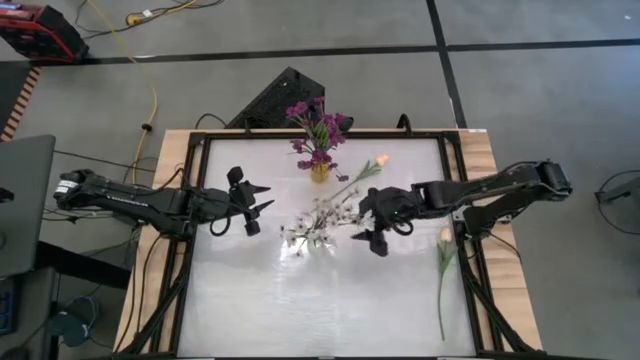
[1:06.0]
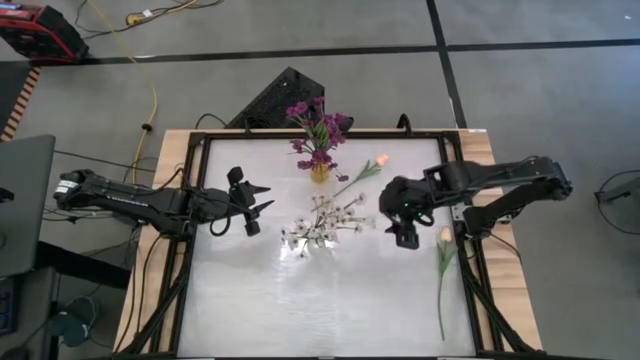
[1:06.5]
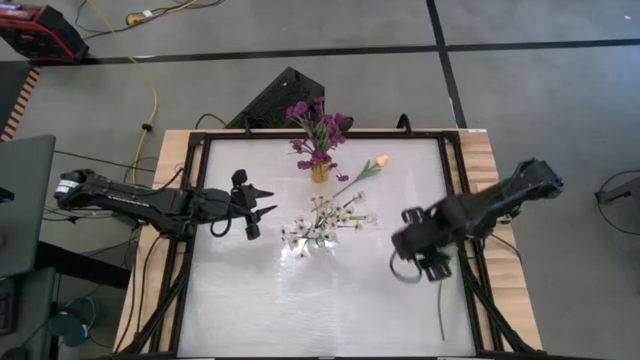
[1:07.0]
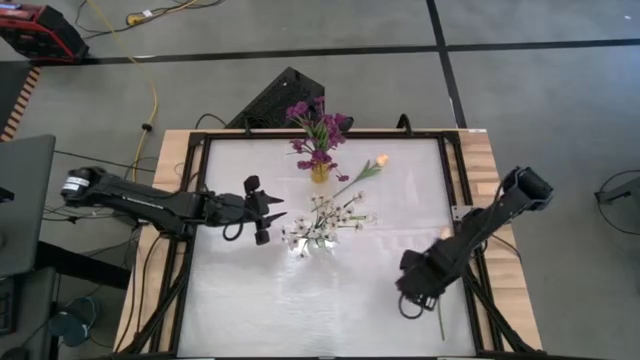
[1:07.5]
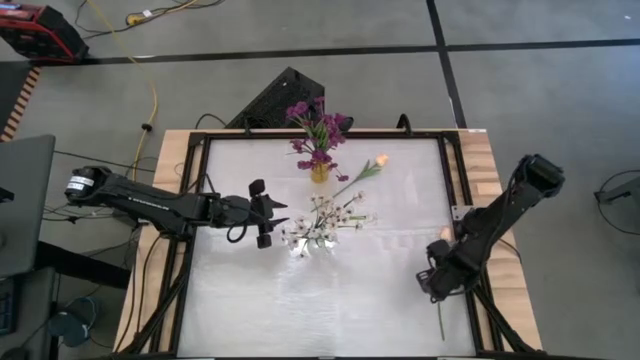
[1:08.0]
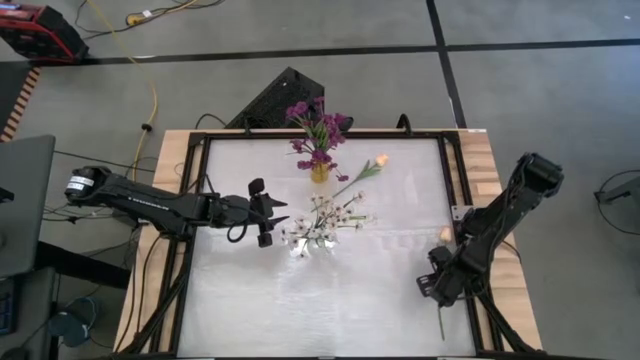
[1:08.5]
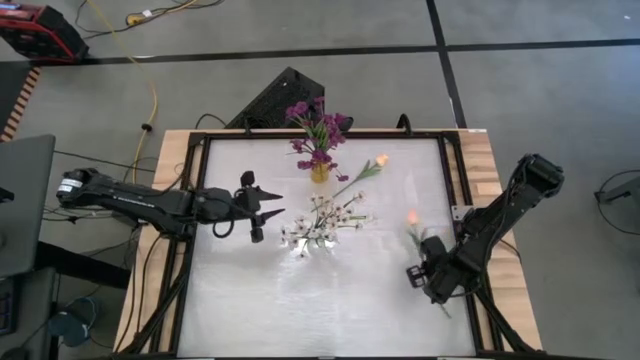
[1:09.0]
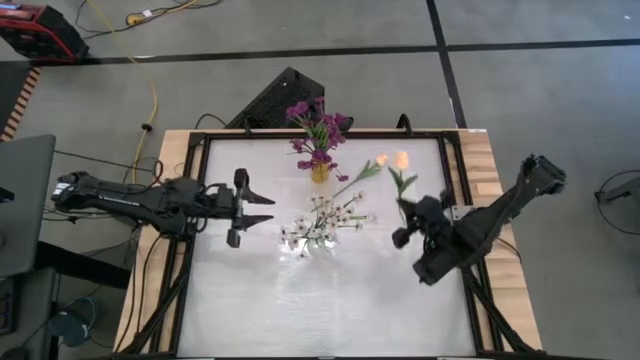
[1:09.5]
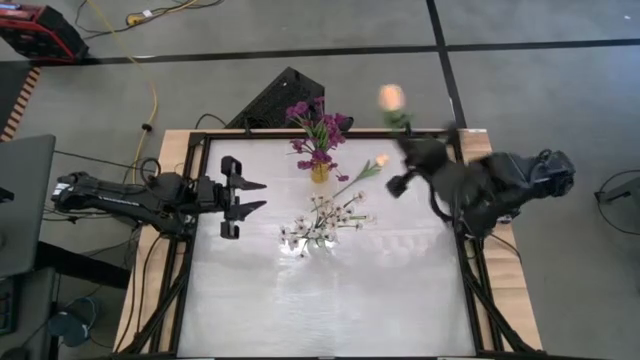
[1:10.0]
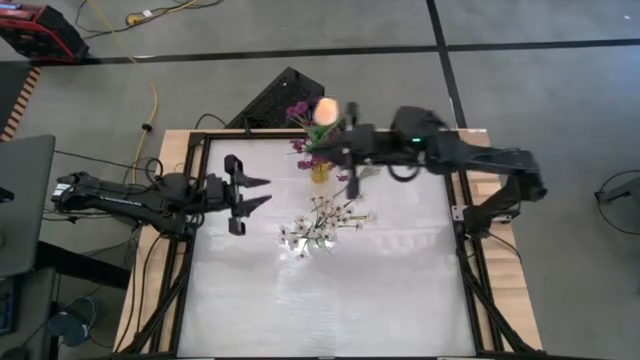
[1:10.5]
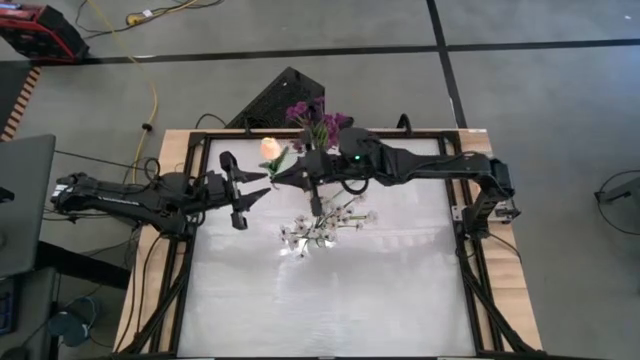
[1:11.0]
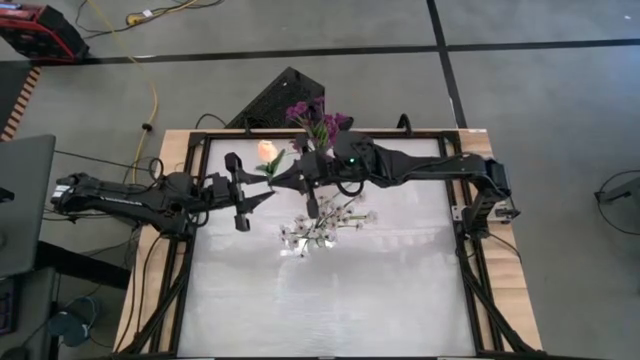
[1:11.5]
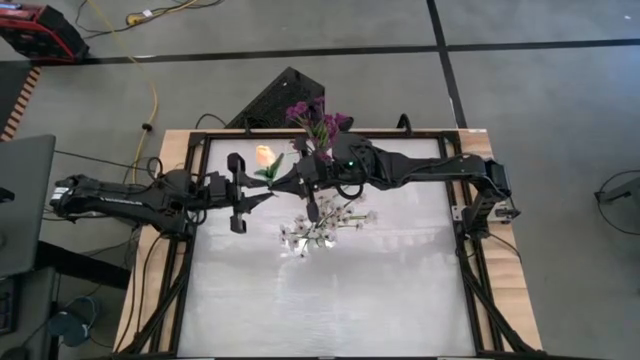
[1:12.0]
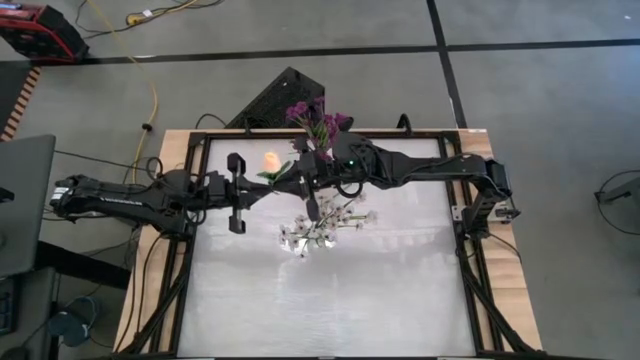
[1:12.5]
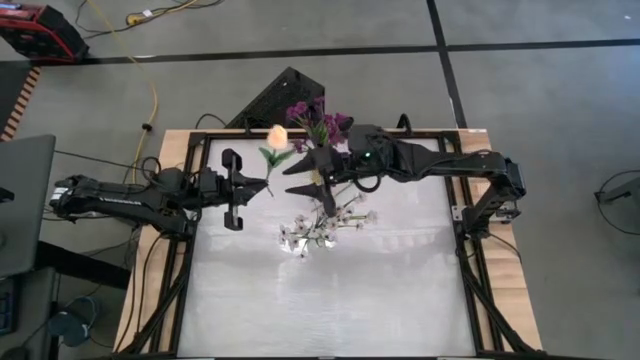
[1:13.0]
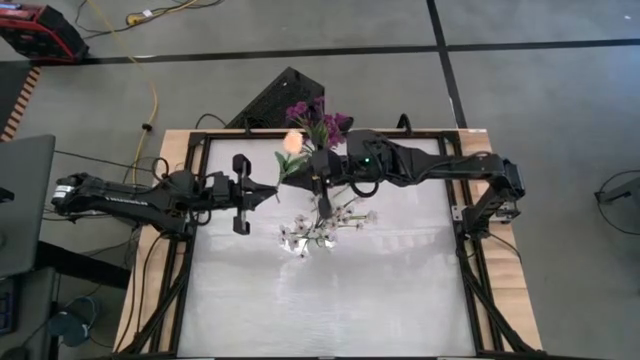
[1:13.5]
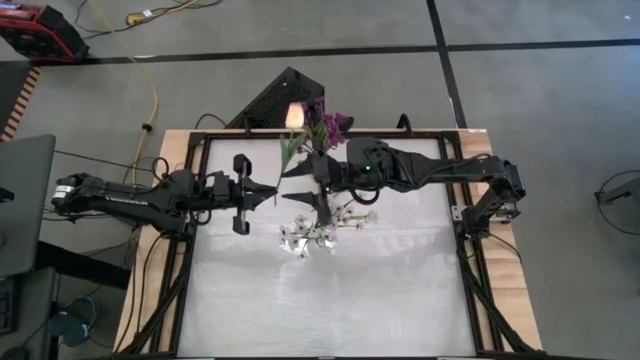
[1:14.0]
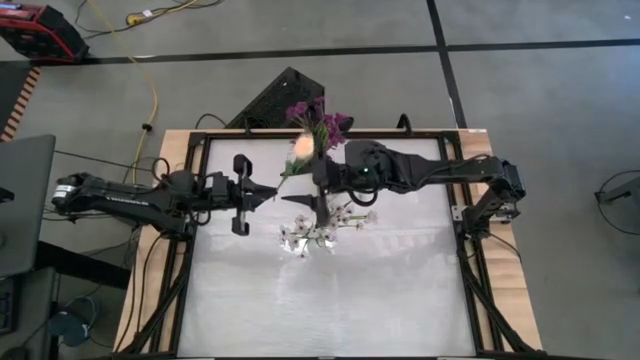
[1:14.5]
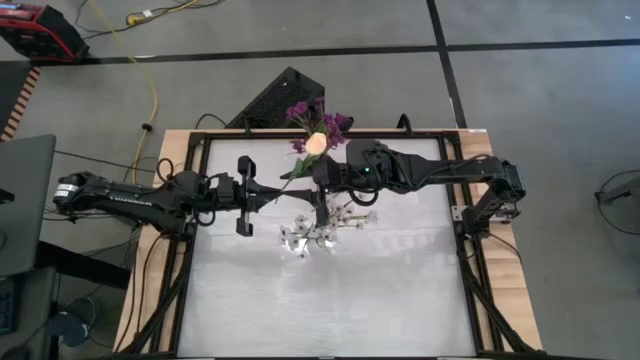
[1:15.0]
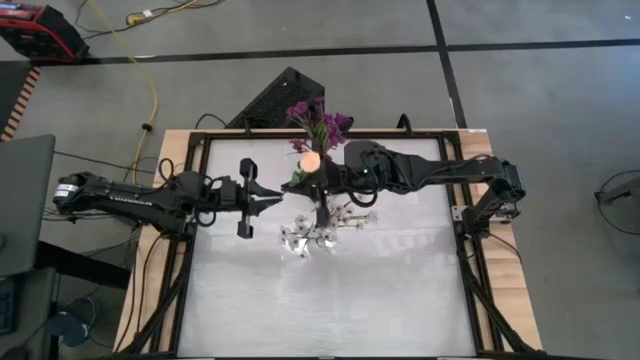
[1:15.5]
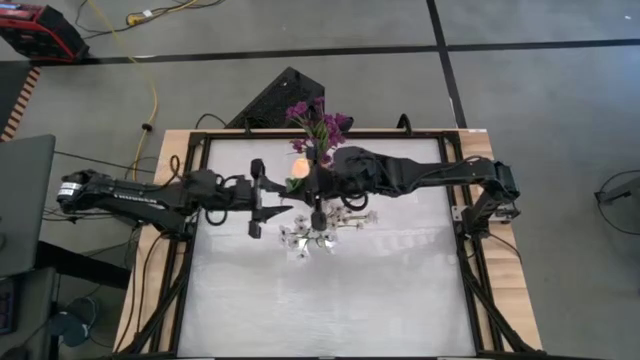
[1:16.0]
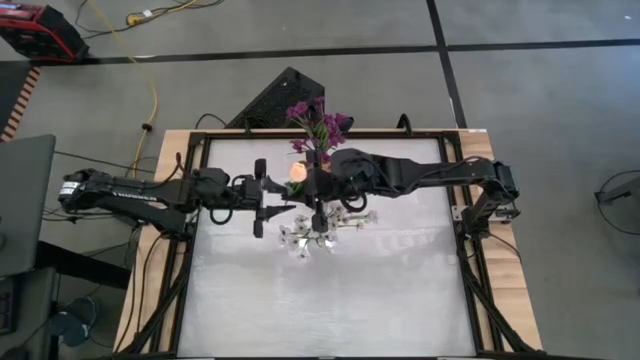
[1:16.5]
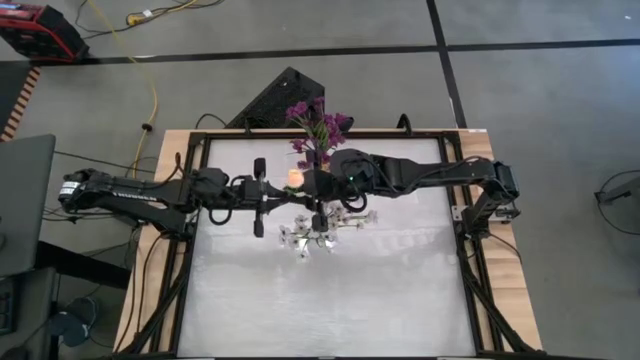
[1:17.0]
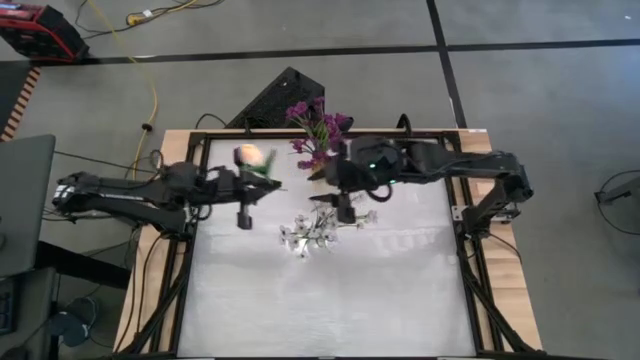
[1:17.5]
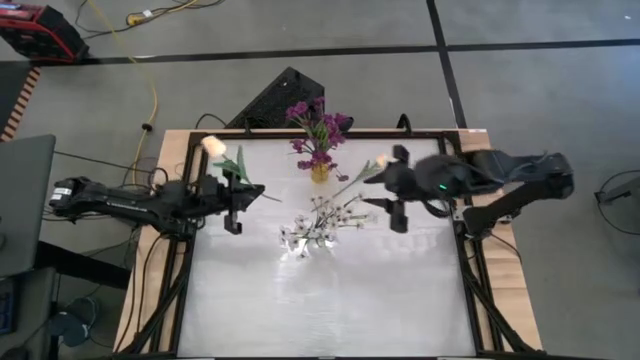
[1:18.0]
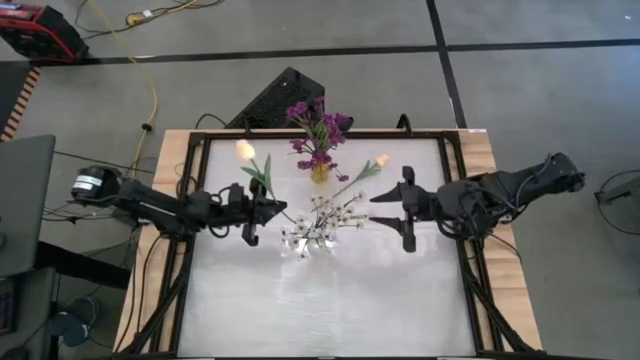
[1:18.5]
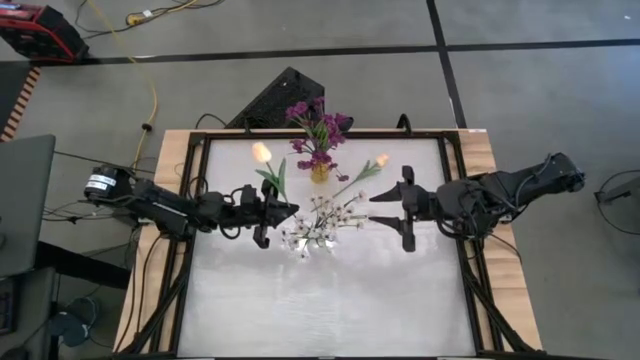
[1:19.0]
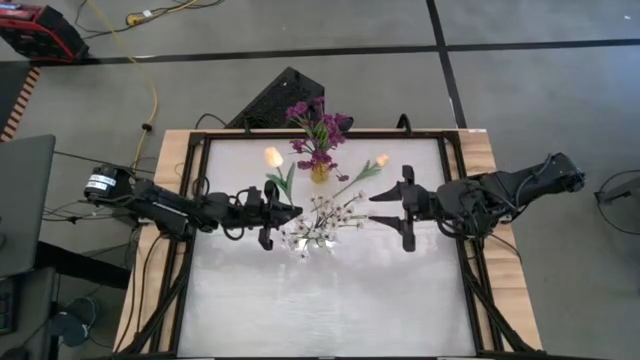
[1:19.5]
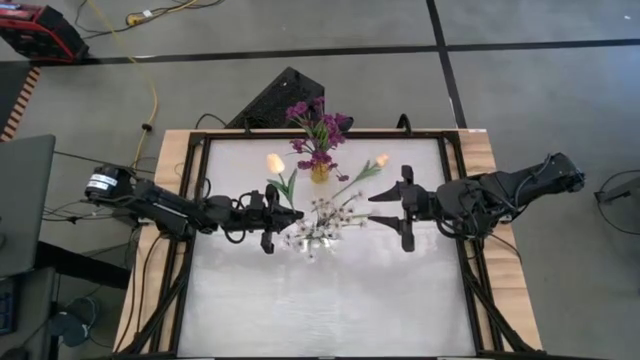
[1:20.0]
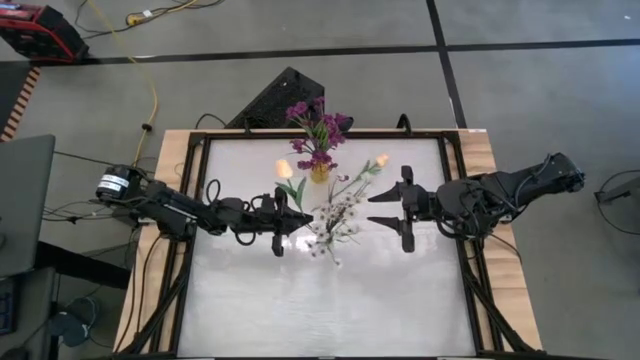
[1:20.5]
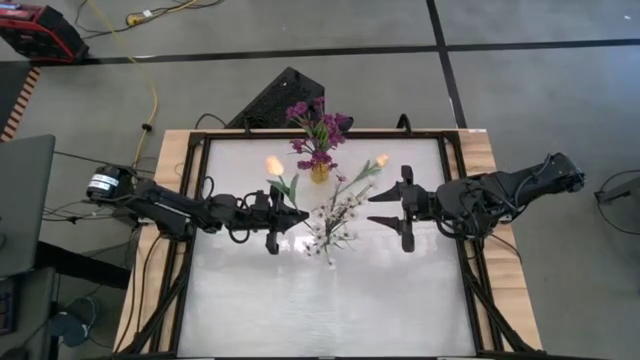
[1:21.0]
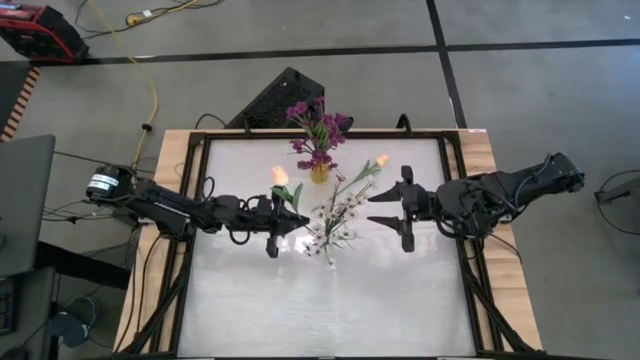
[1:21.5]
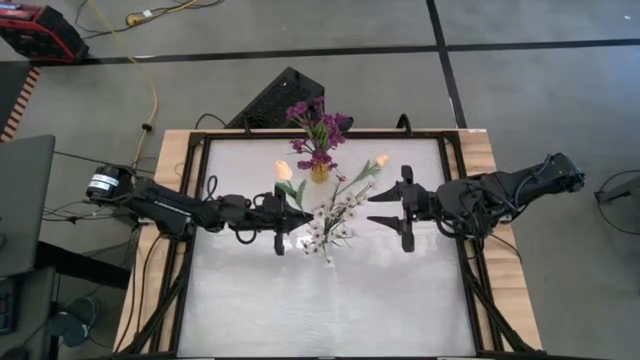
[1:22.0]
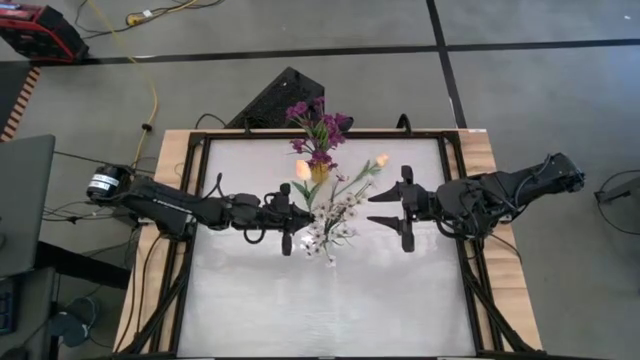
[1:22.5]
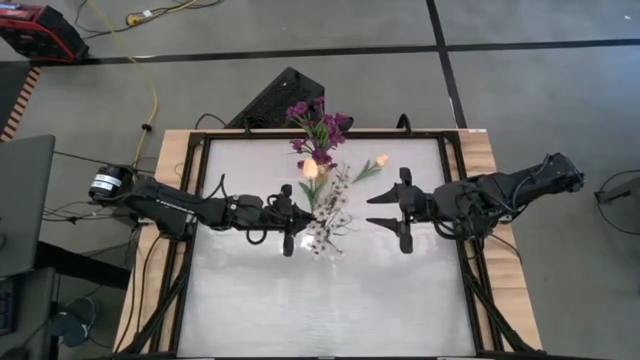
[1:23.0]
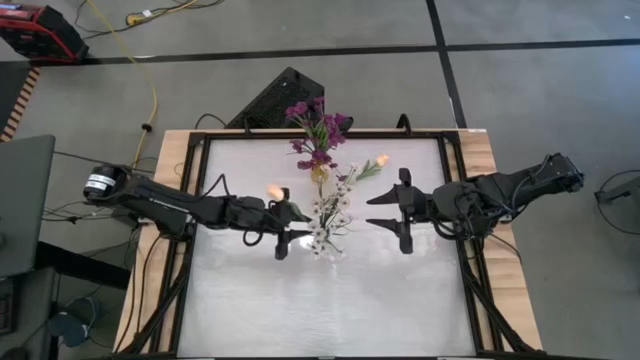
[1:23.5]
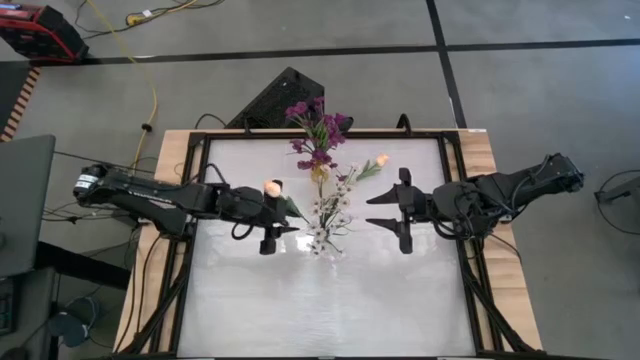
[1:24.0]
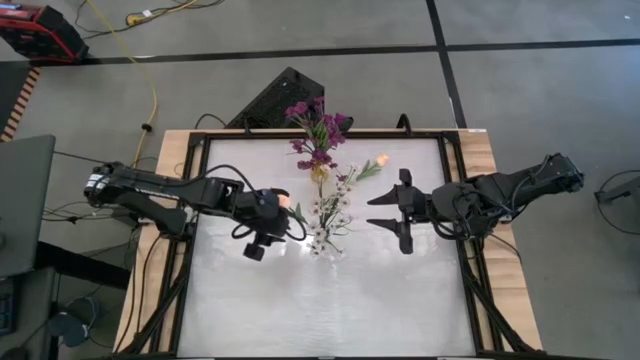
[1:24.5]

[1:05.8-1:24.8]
Task: Sort flowers into vase by color
Put the bottom pink flower into the transparent vase
